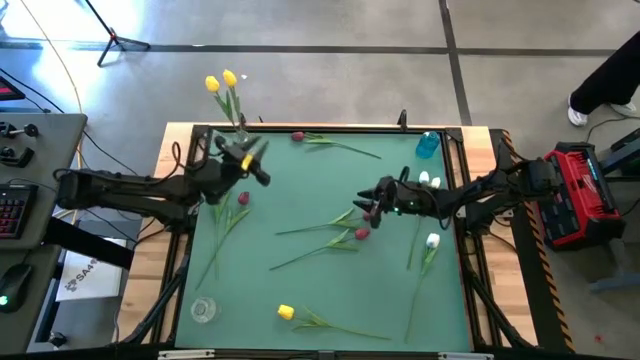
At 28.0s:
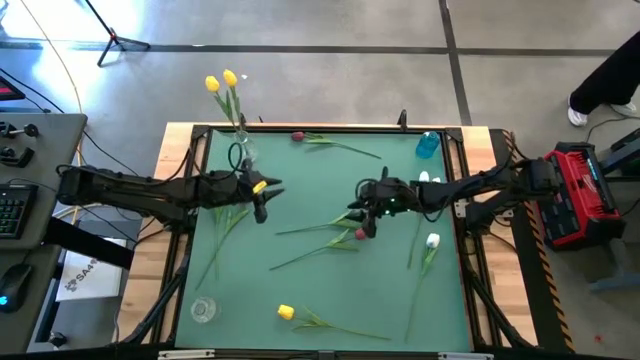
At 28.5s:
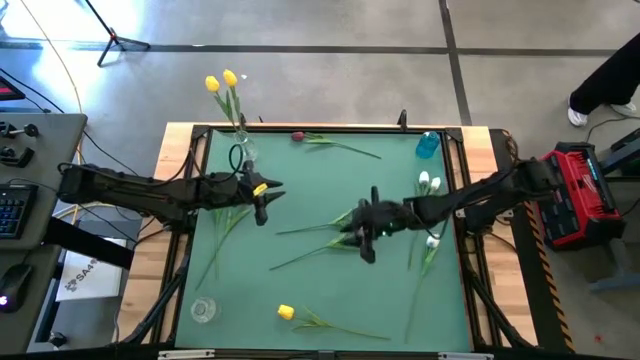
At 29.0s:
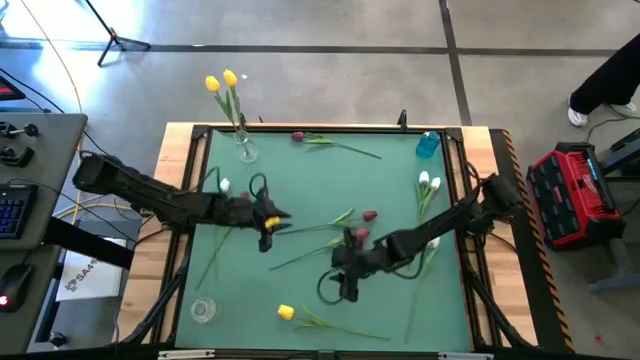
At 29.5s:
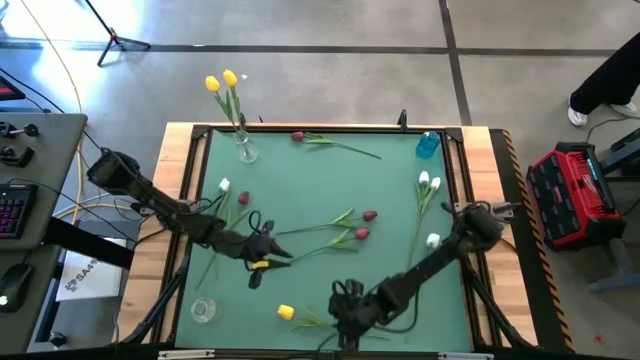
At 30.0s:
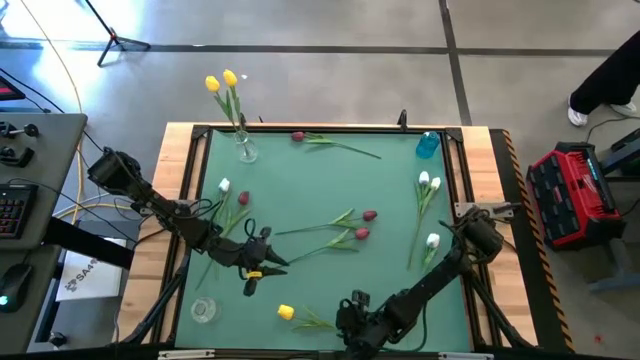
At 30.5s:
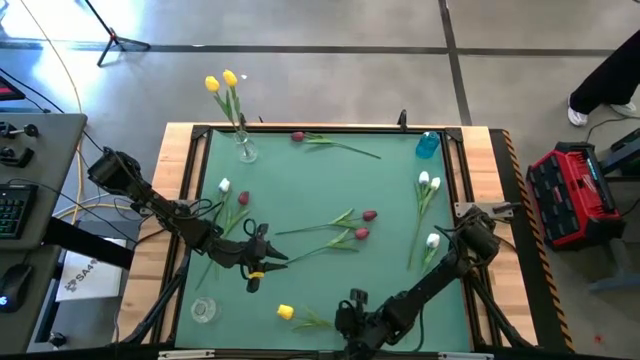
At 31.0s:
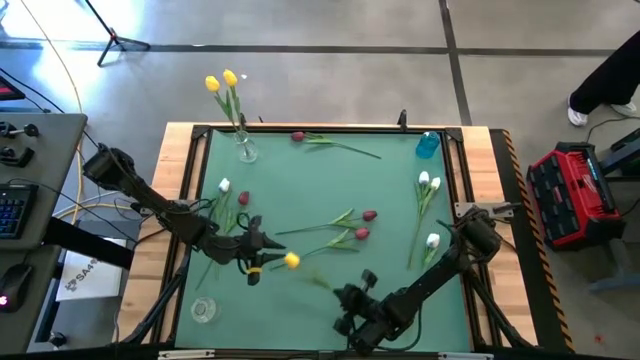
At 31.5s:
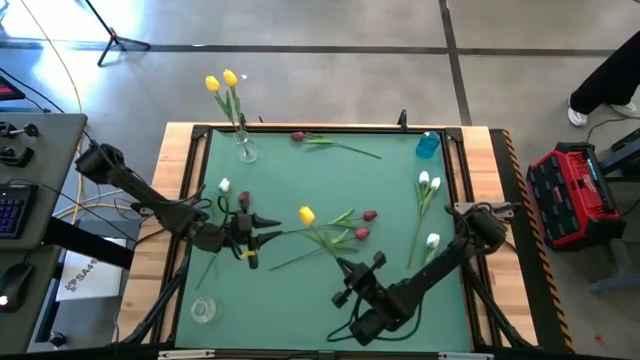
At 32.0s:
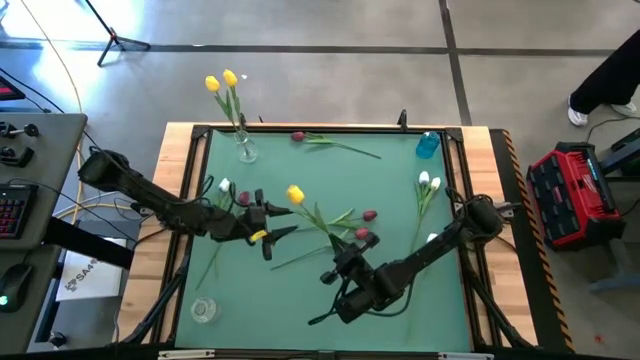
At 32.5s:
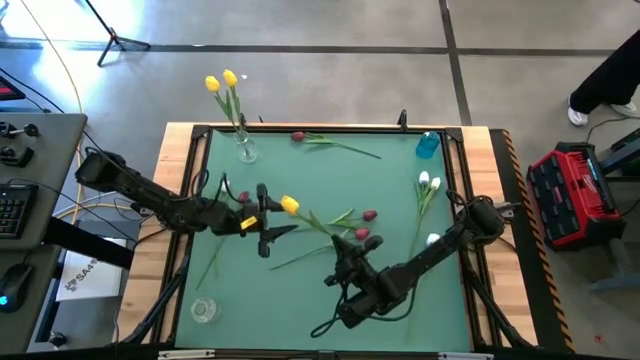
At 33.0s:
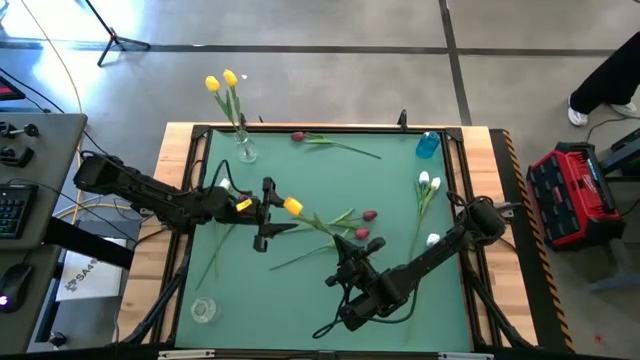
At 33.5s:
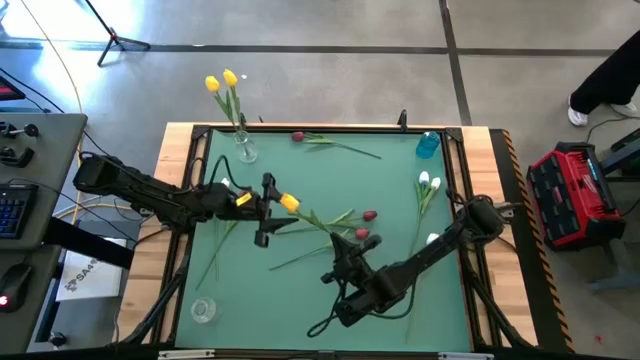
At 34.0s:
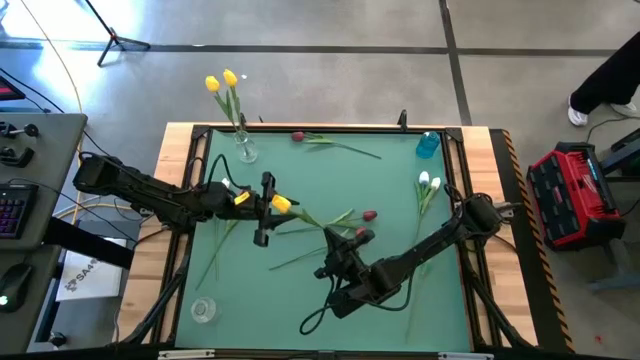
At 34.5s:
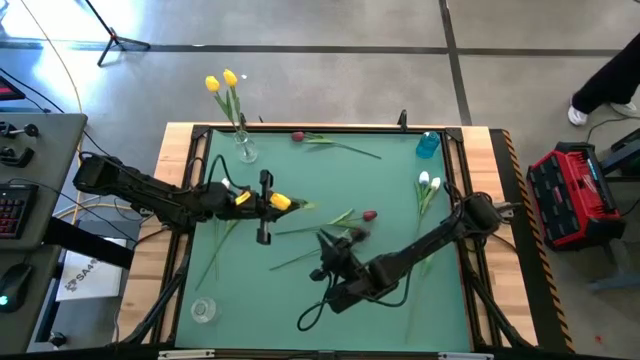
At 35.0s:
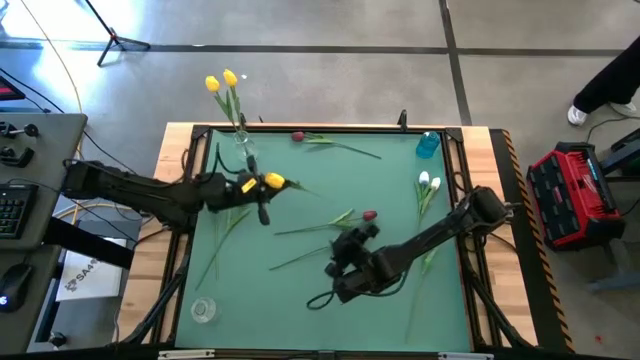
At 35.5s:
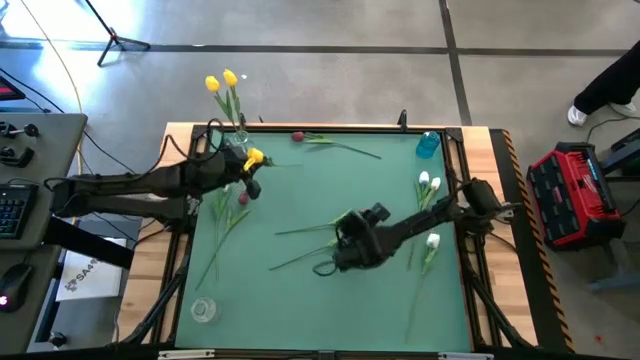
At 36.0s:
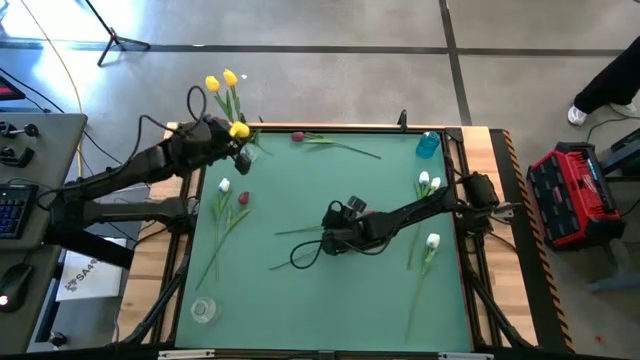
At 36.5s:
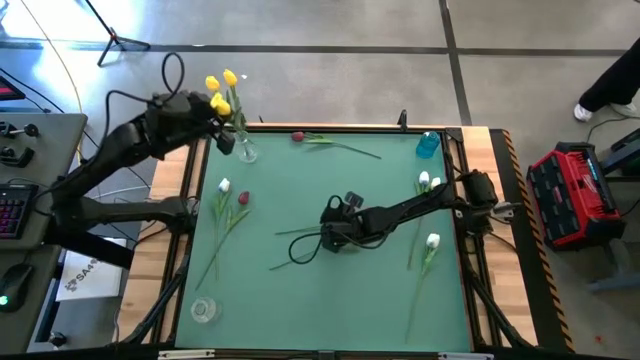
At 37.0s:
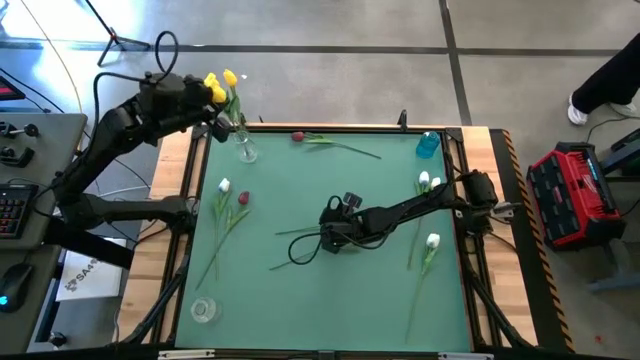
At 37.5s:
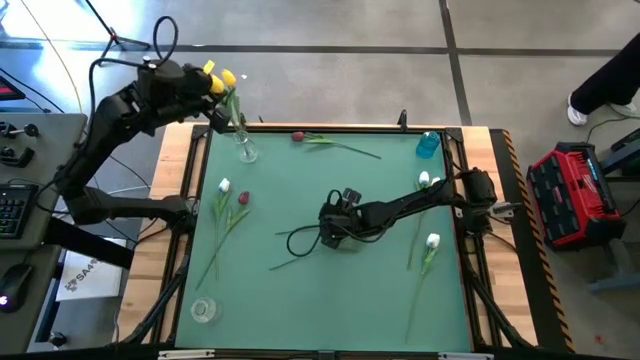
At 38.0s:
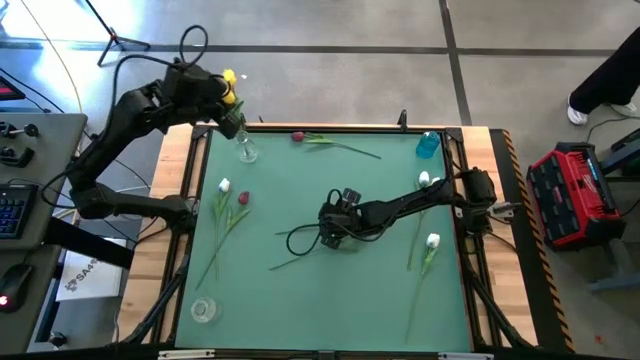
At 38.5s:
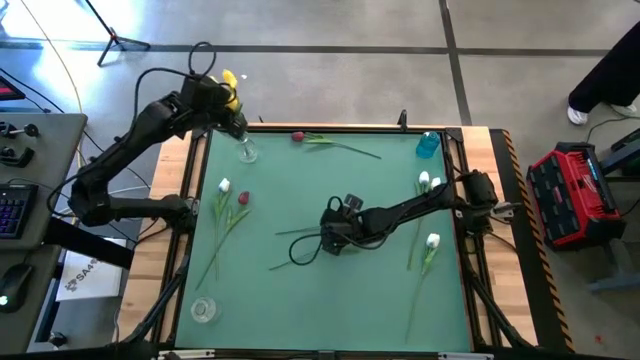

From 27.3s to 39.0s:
Task: Sort flowers into vase by color
Put the yellow tulip into the top transparent vase

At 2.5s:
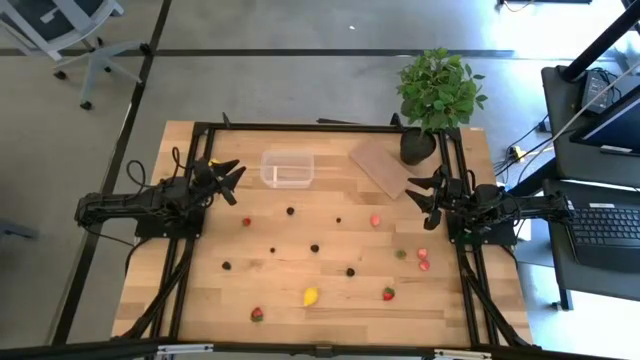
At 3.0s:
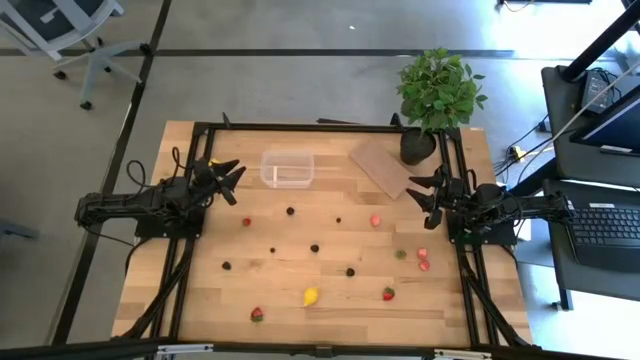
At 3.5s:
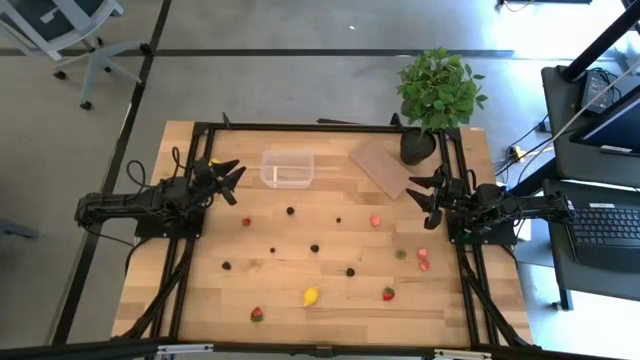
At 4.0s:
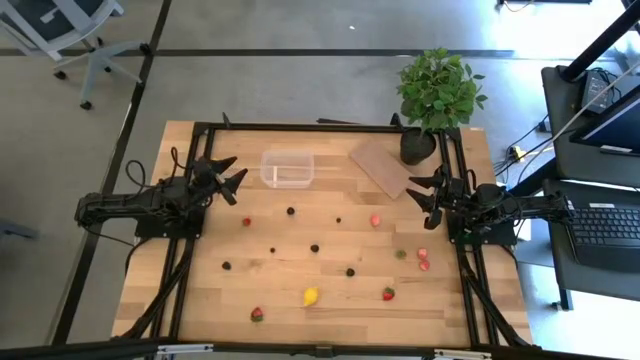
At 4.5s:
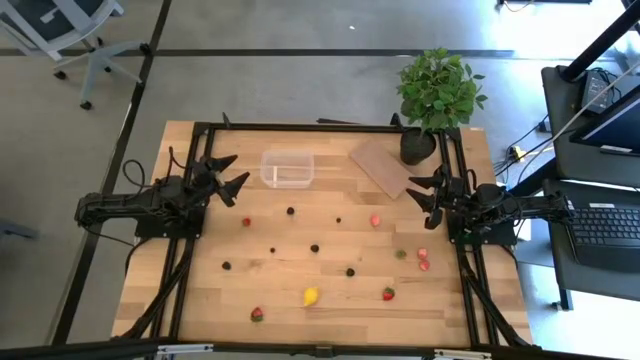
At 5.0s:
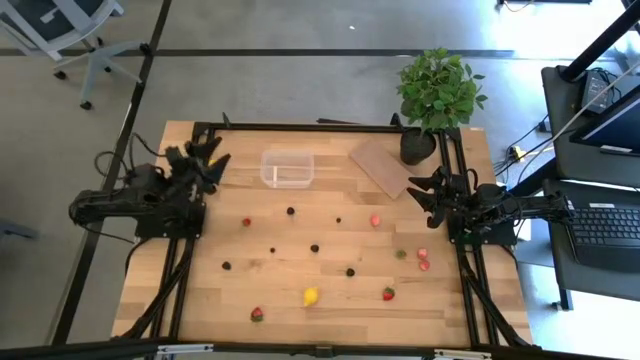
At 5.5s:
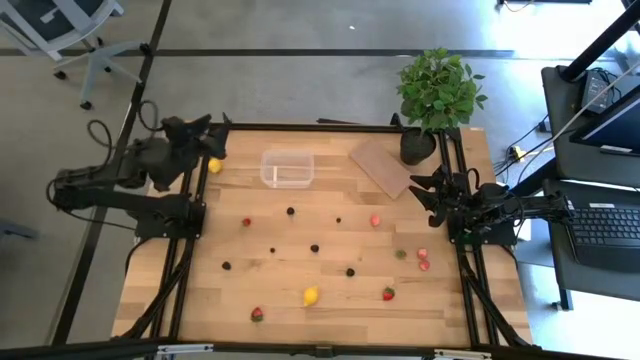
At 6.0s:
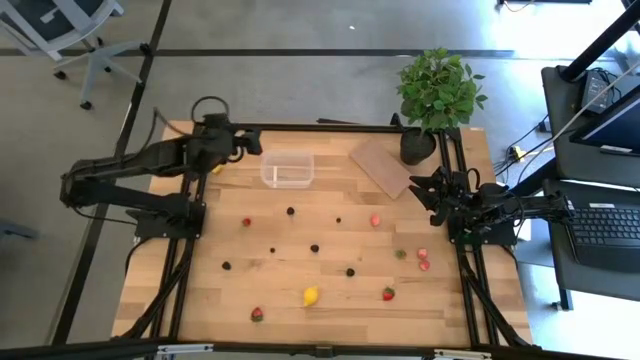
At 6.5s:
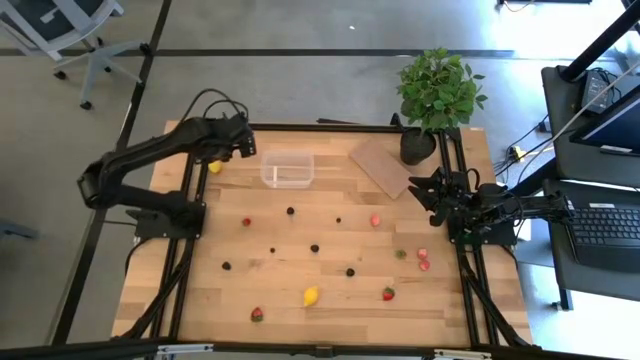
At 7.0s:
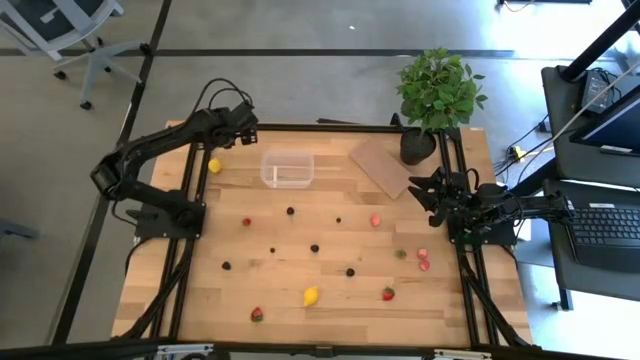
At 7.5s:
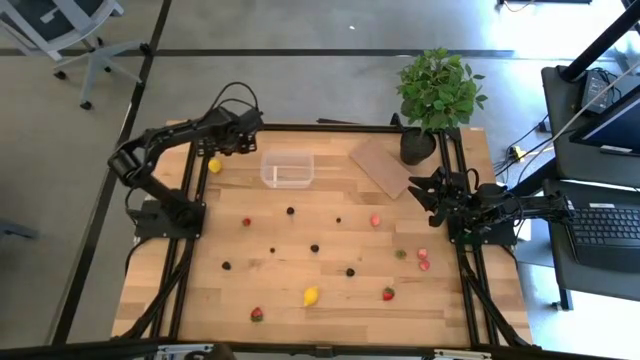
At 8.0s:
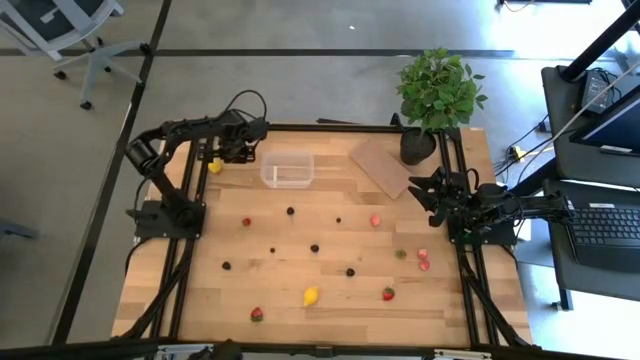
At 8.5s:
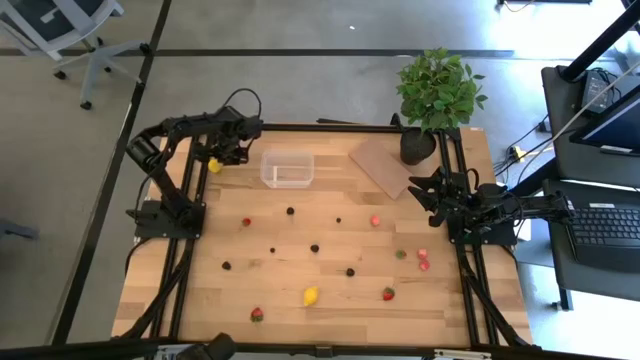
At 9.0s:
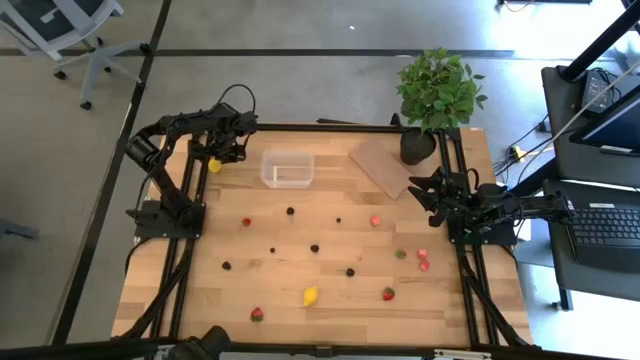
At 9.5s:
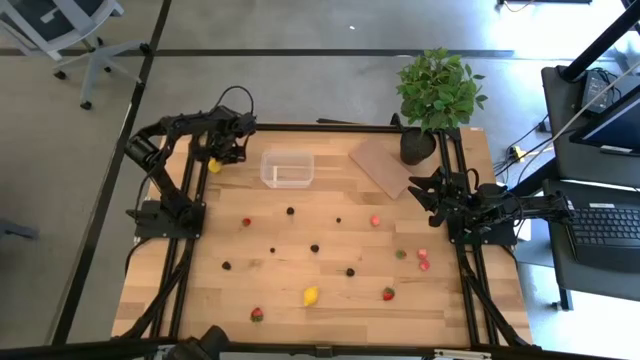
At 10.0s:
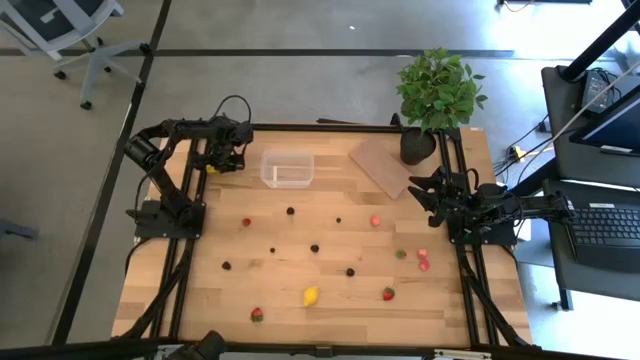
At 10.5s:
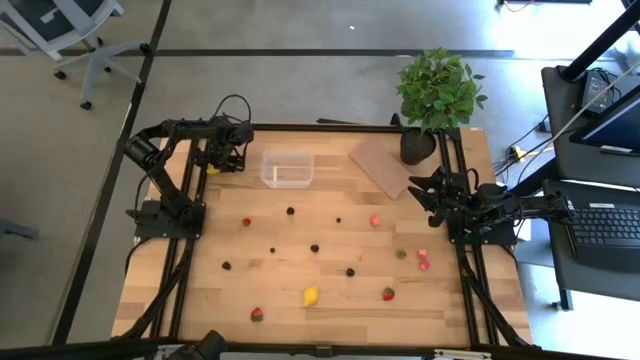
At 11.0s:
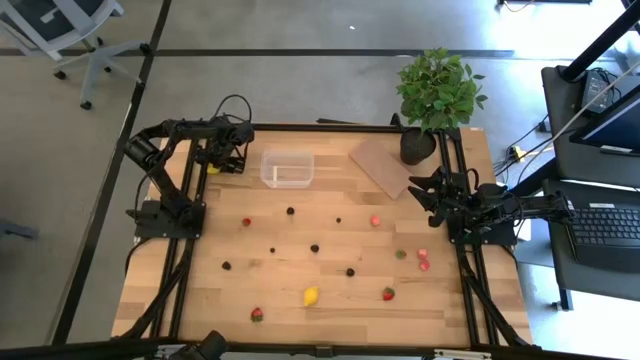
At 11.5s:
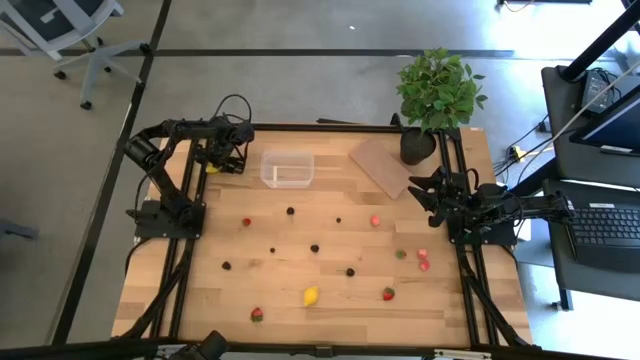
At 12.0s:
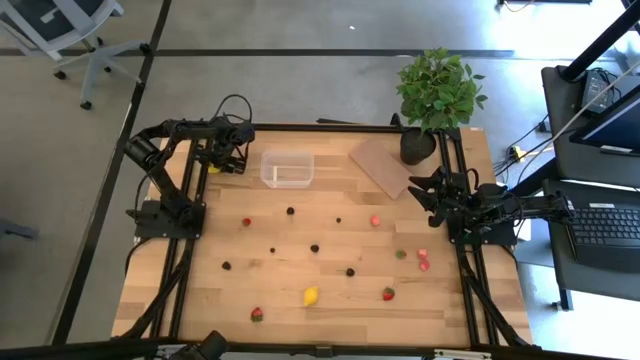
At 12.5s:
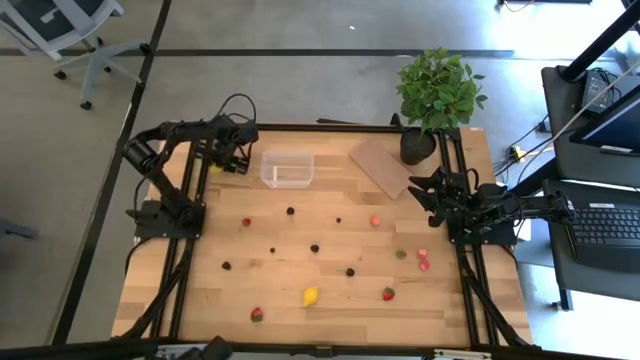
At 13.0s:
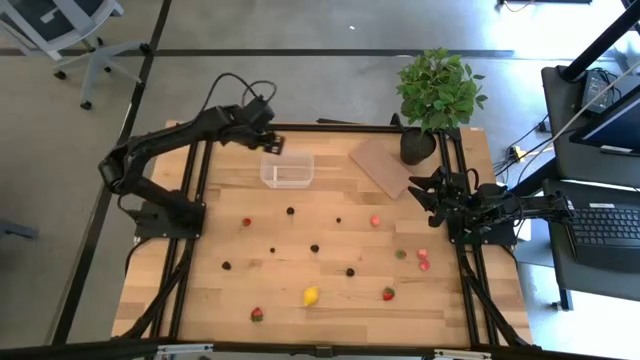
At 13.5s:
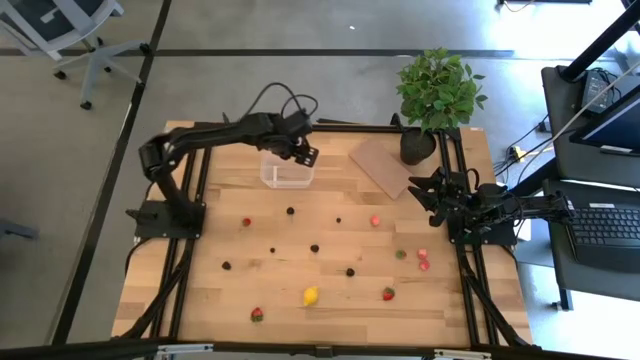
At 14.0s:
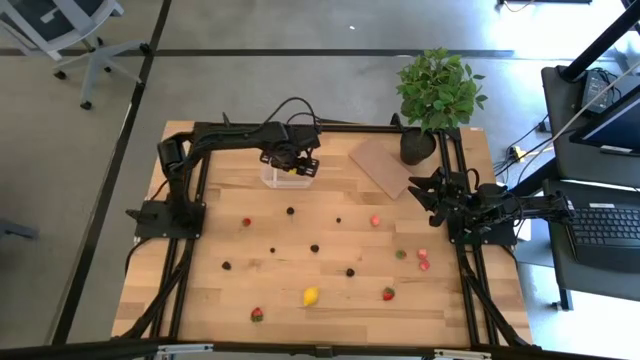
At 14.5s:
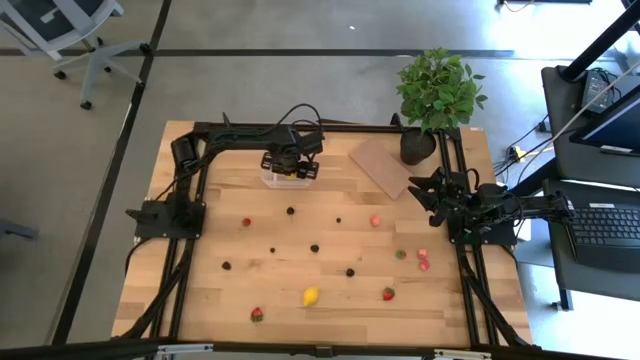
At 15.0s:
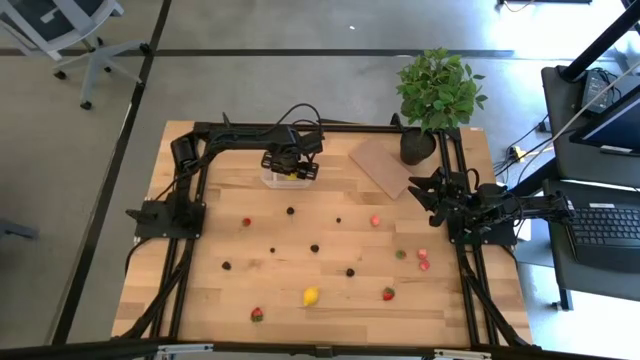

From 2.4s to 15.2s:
Task: Pick and placing Produce into tupperware
Put the yellow lemon into the transparent bin
